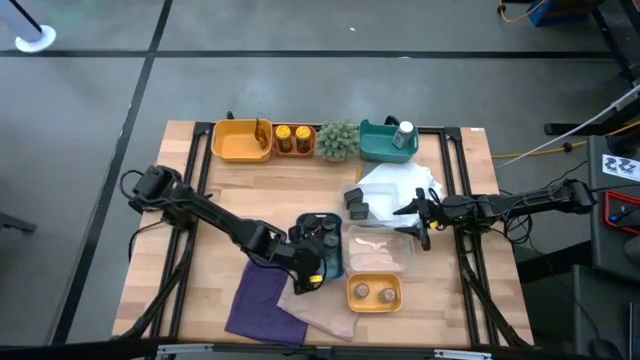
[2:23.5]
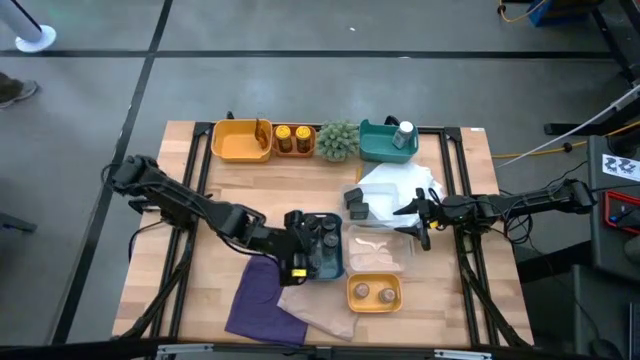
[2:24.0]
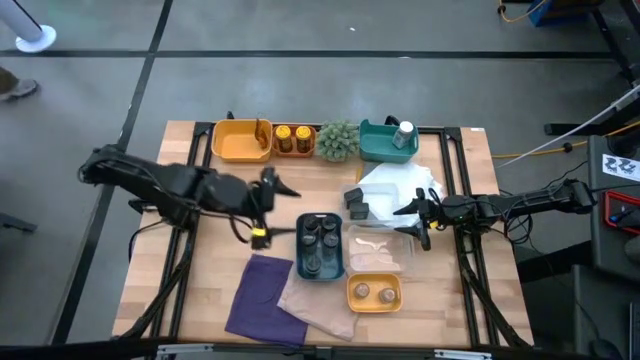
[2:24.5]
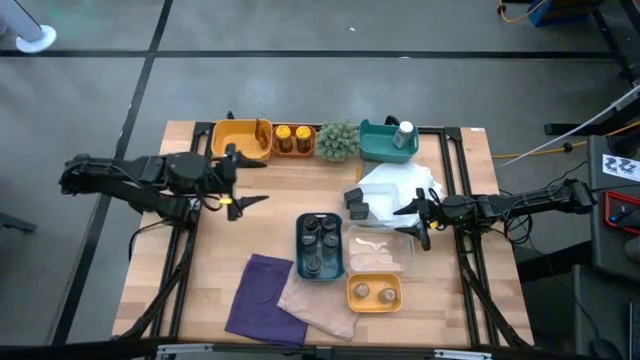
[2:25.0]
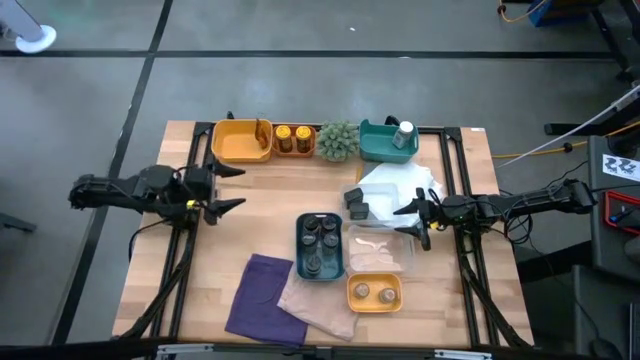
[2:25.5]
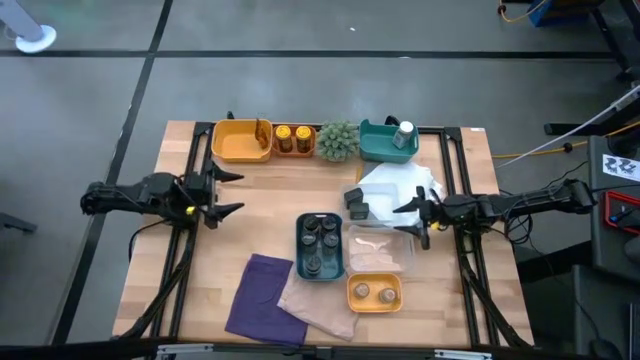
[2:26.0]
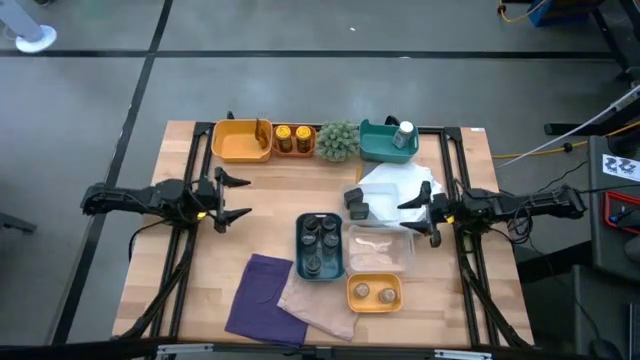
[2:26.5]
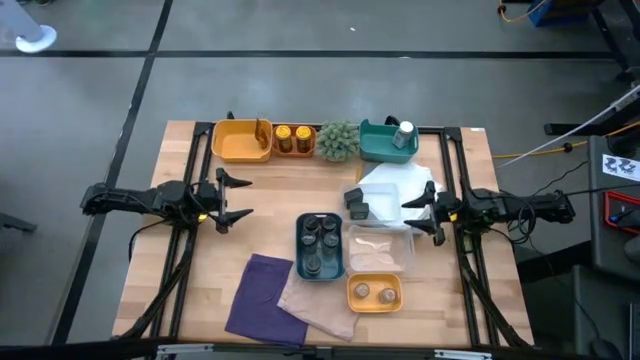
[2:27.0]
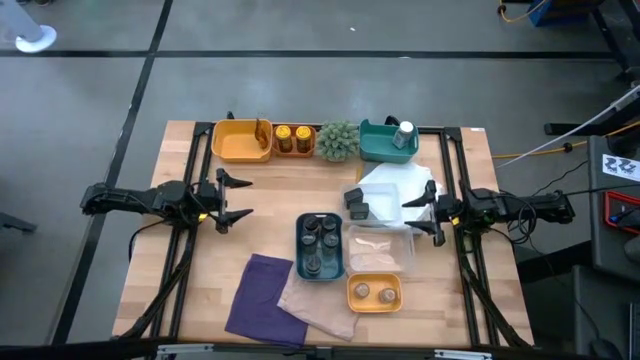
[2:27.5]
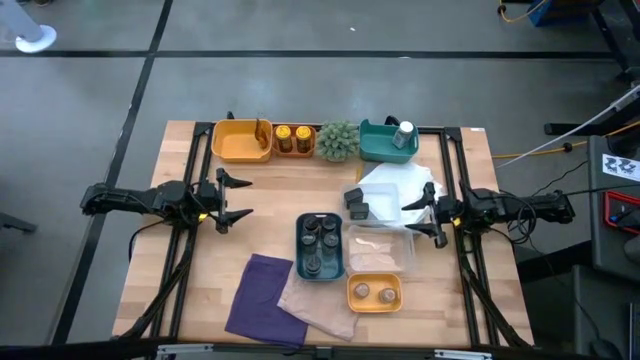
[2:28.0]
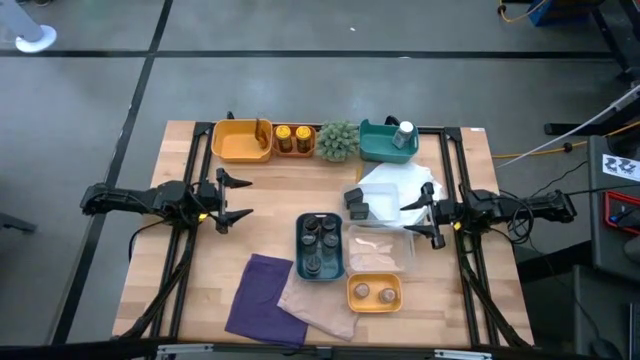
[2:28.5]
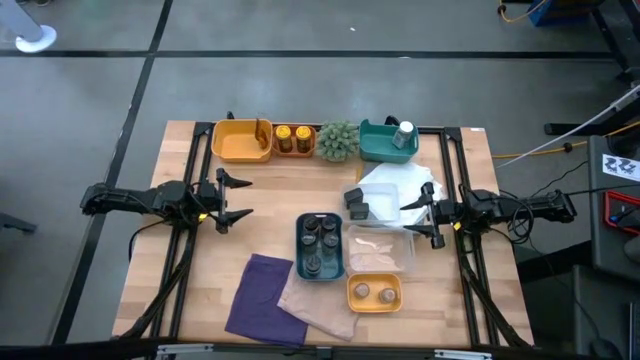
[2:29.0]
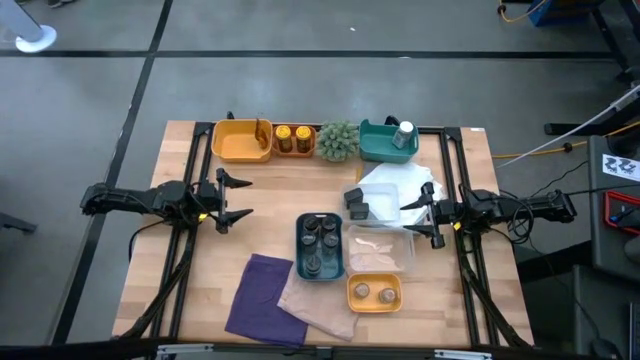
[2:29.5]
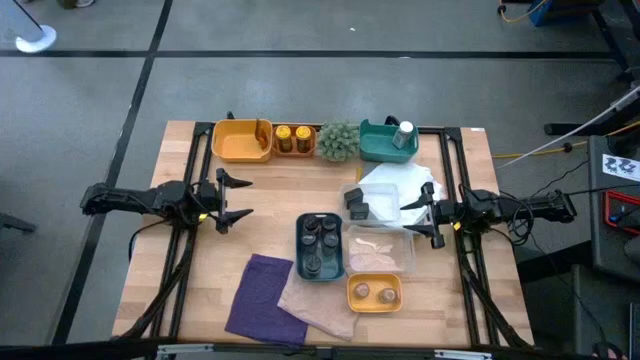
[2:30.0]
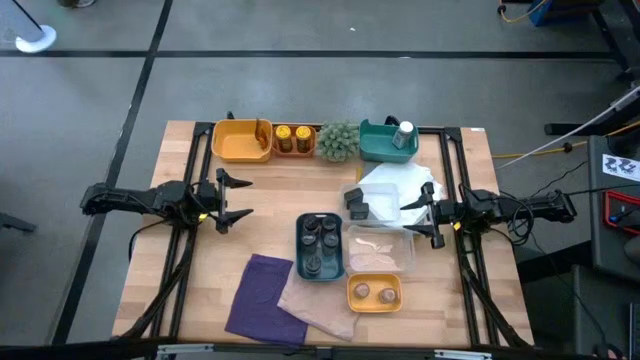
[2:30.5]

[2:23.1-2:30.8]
Task: Sort spices by type
Return to Home Position

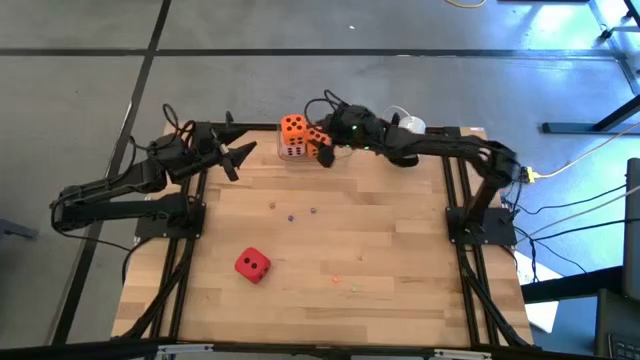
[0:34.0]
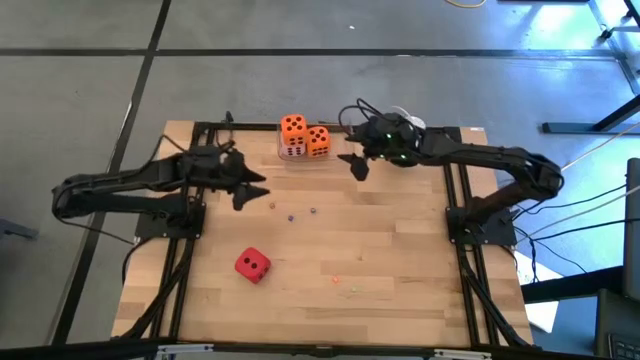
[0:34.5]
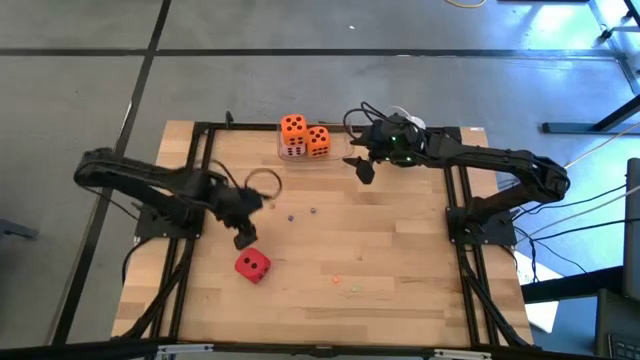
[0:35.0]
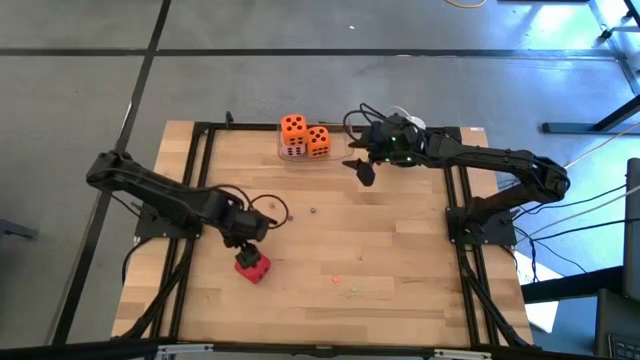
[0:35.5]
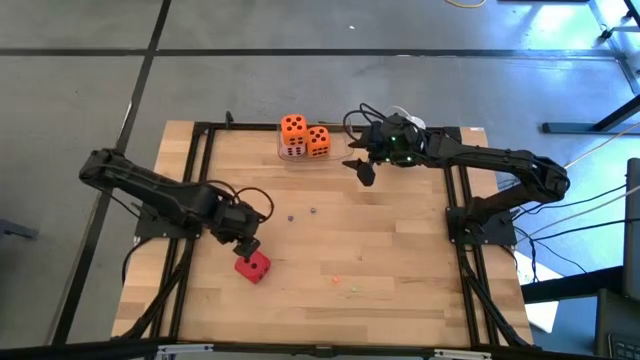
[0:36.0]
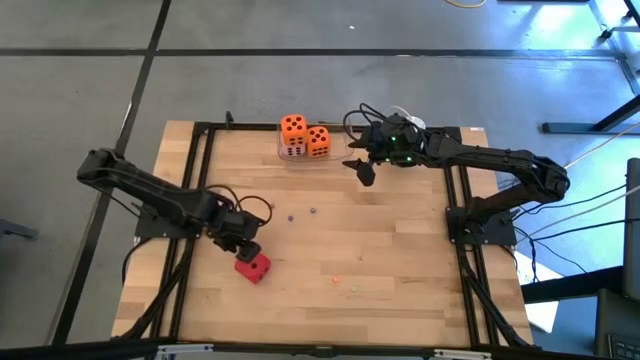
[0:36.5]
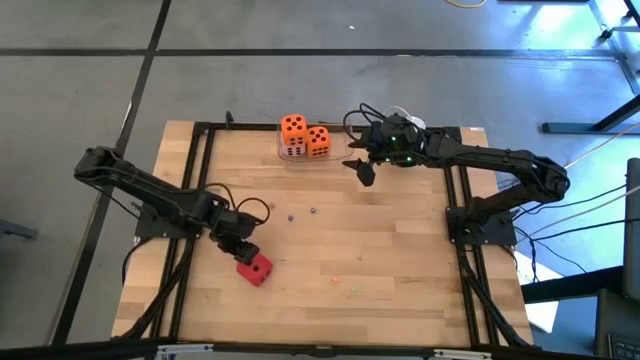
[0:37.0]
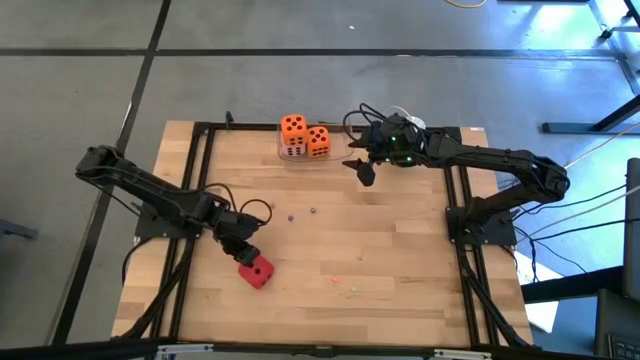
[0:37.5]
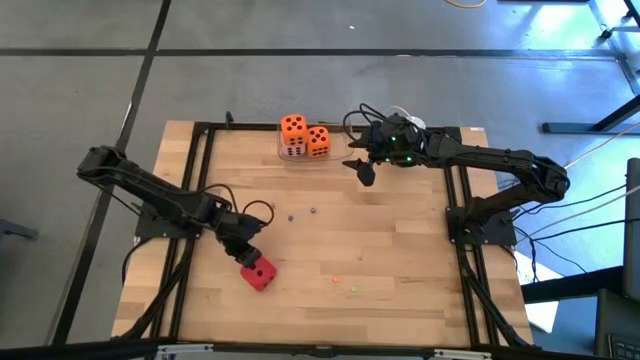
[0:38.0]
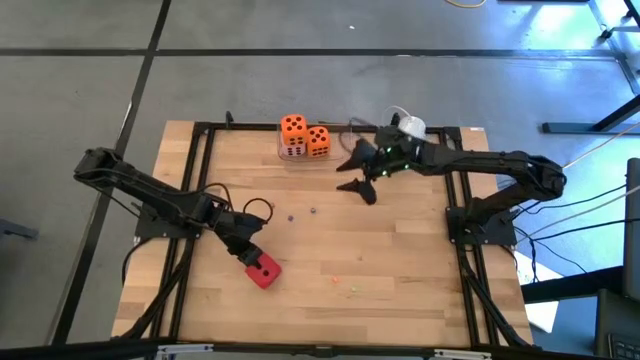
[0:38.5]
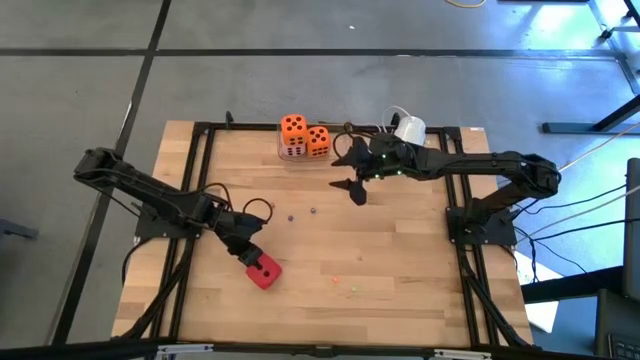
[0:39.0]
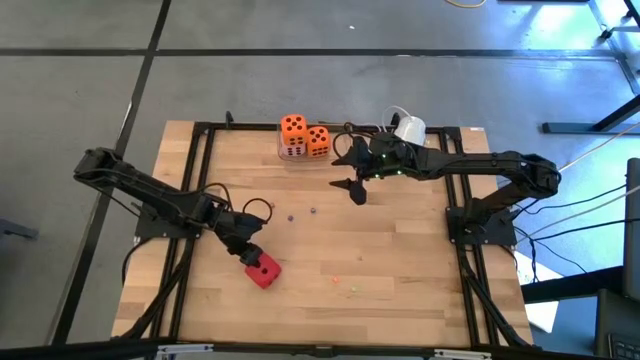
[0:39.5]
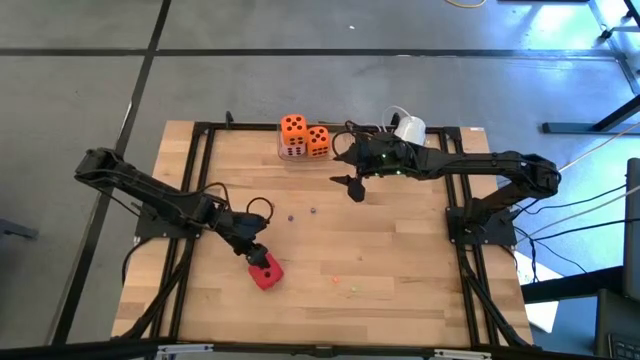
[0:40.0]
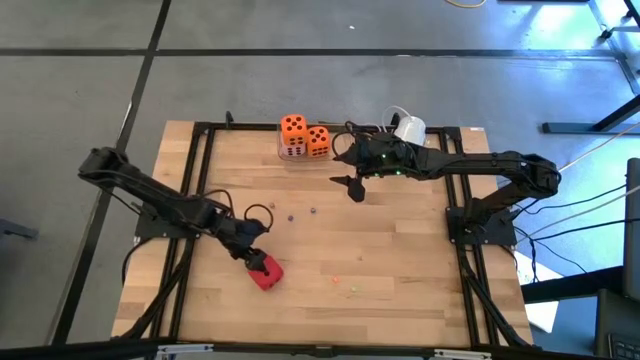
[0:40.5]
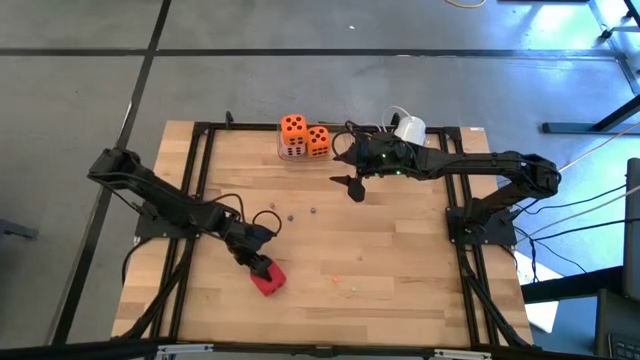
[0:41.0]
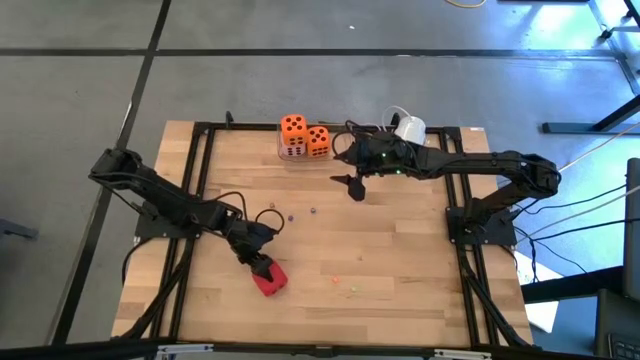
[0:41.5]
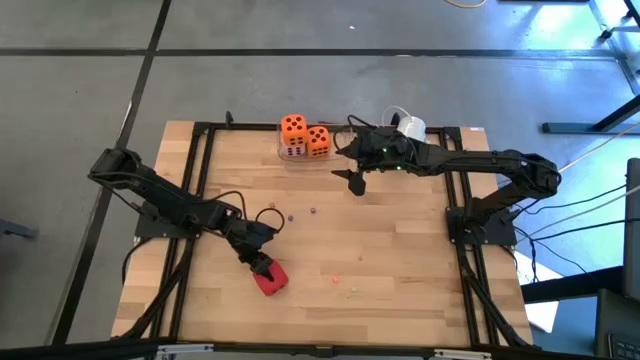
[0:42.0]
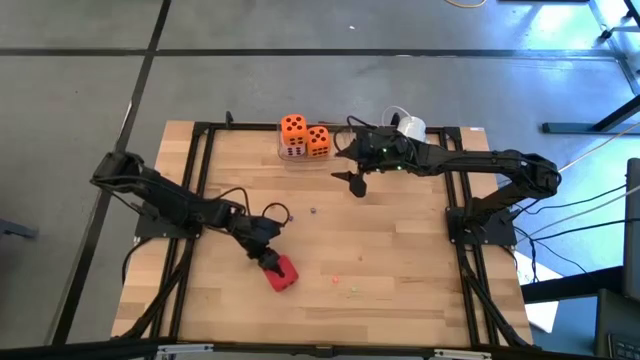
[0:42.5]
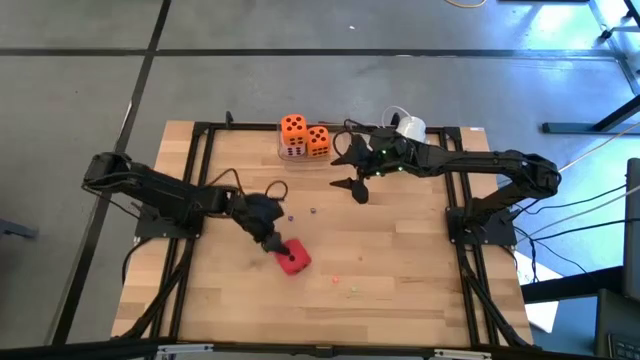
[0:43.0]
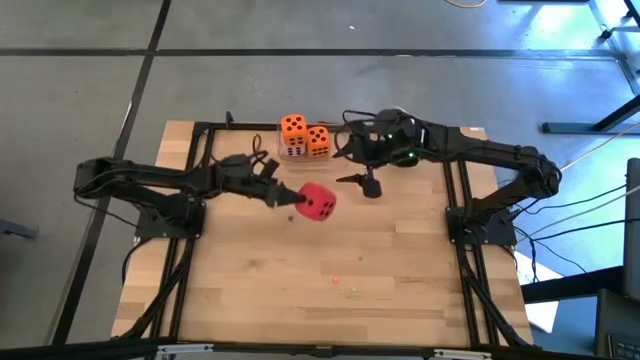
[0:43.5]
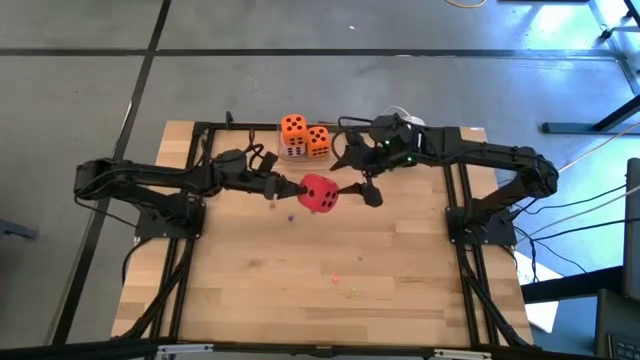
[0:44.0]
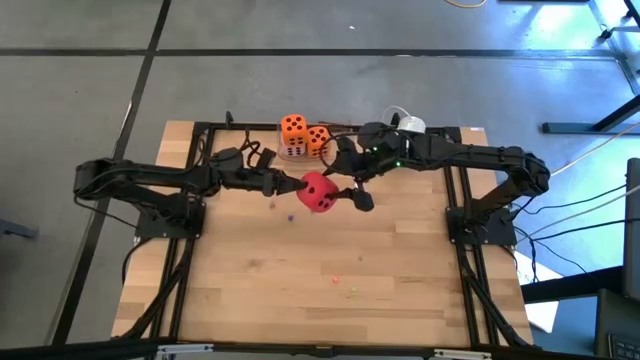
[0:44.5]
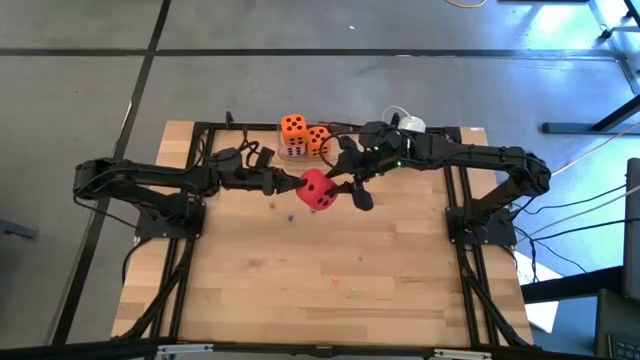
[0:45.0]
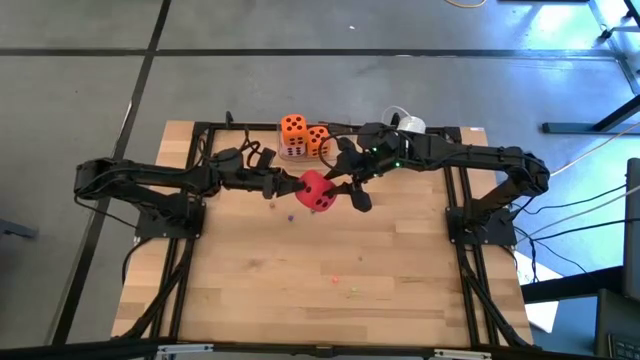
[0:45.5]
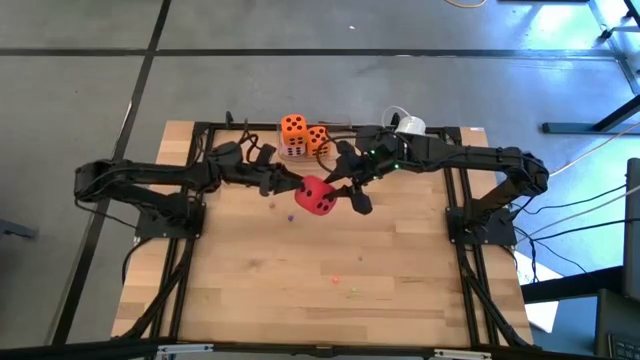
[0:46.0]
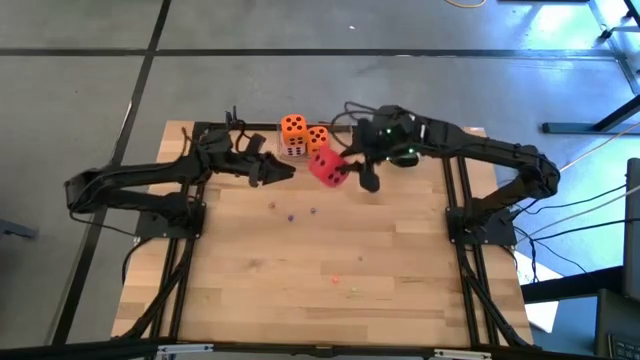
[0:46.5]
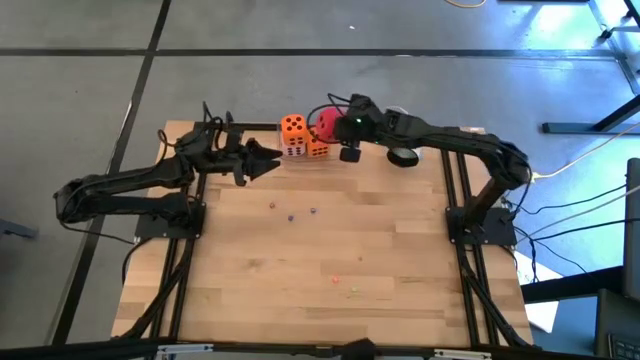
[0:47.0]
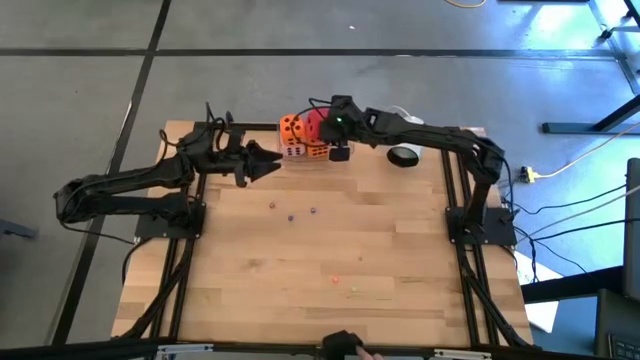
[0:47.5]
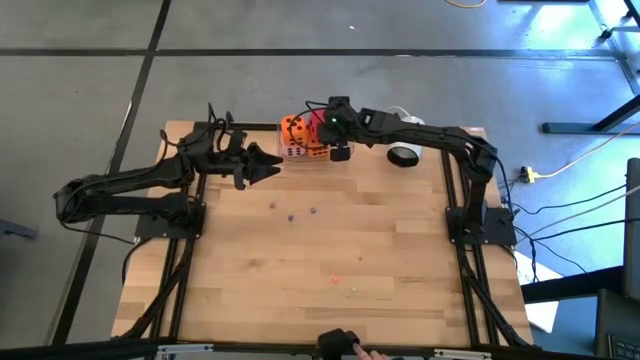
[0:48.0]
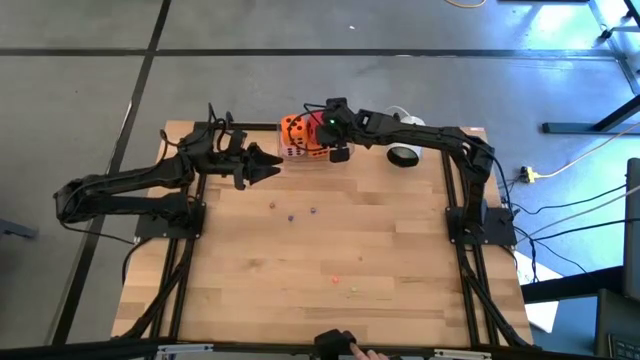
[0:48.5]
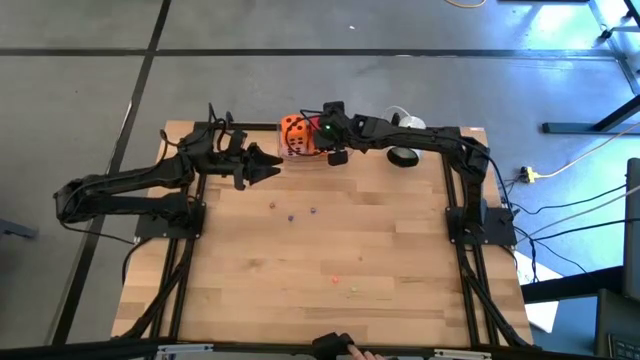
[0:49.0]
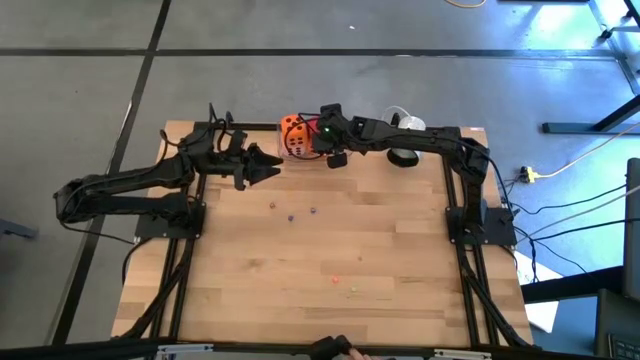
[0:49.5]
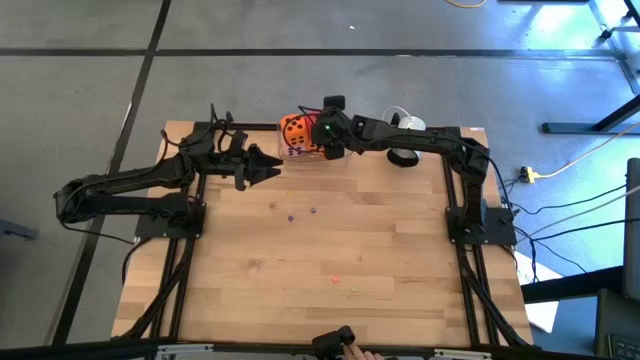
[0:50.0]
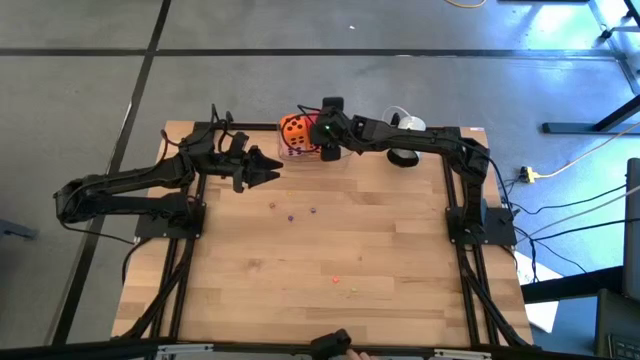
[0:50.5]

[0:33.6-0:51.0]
Task: Pick & Place Dice
Put the large red dice into the transparent bin
